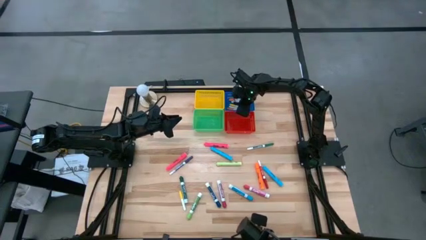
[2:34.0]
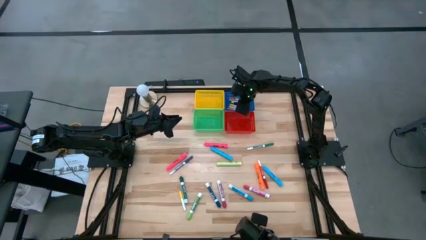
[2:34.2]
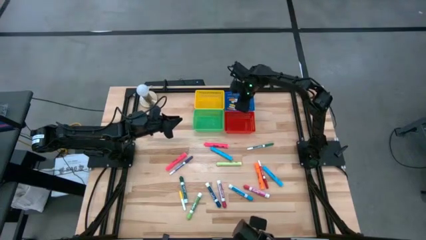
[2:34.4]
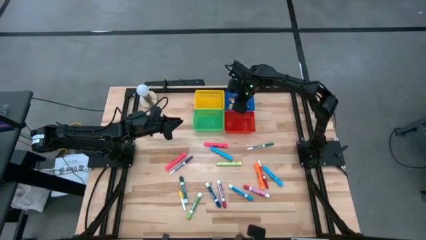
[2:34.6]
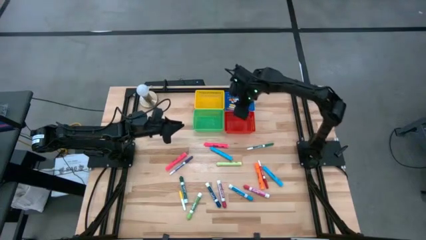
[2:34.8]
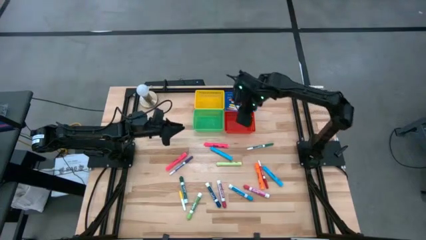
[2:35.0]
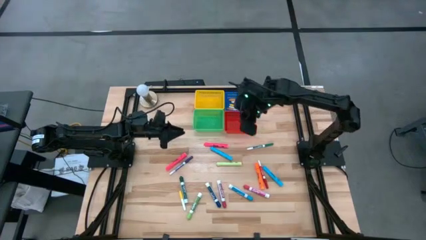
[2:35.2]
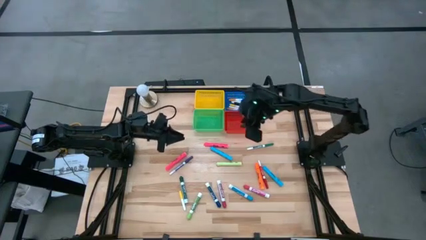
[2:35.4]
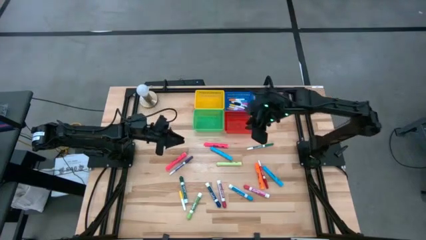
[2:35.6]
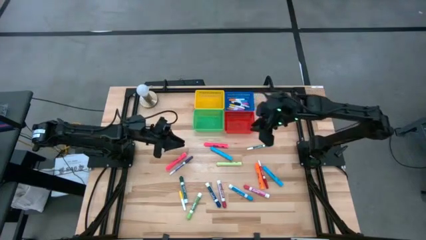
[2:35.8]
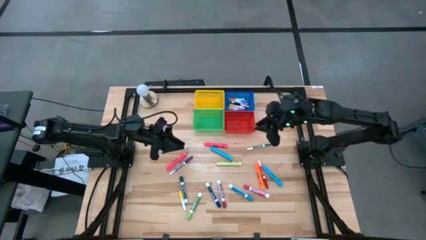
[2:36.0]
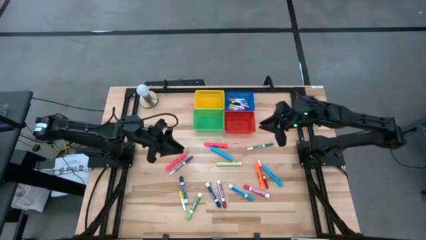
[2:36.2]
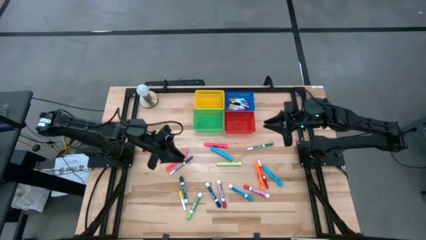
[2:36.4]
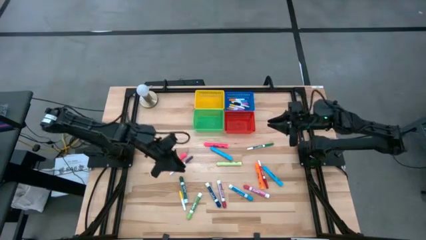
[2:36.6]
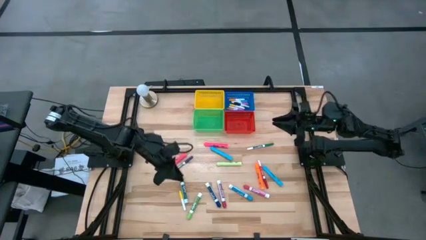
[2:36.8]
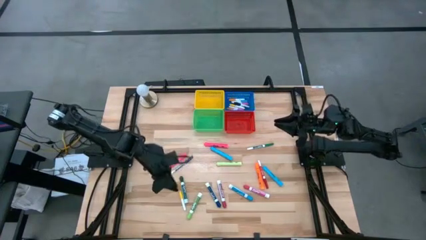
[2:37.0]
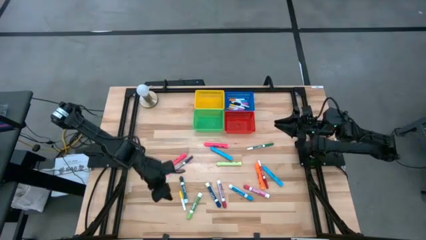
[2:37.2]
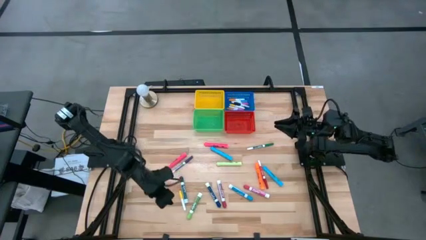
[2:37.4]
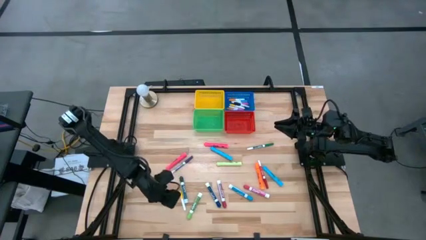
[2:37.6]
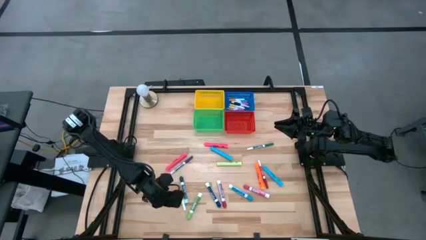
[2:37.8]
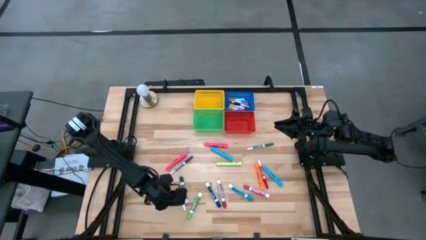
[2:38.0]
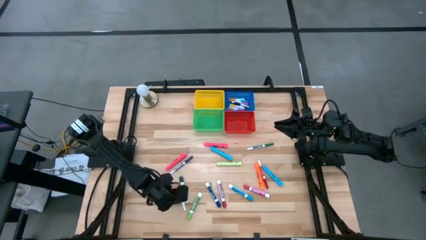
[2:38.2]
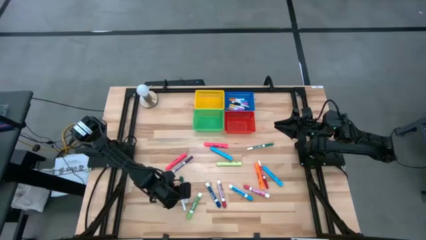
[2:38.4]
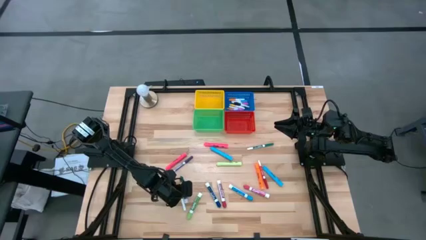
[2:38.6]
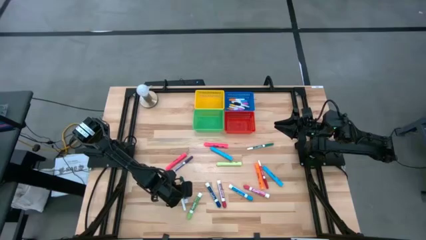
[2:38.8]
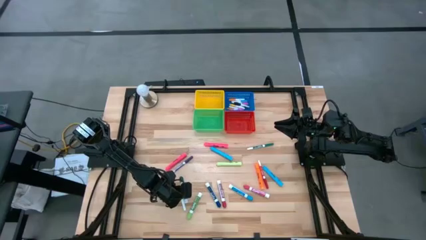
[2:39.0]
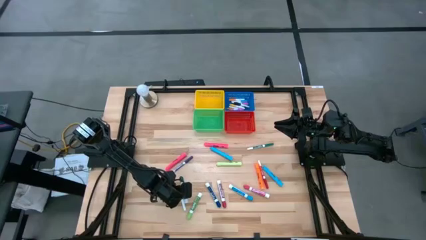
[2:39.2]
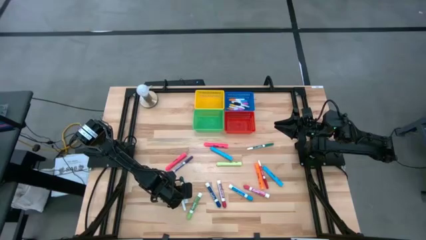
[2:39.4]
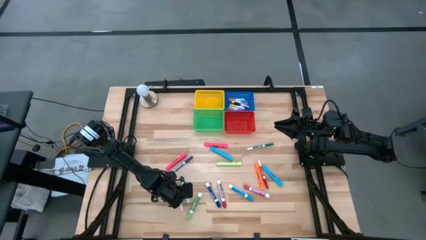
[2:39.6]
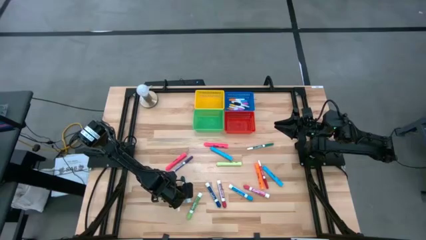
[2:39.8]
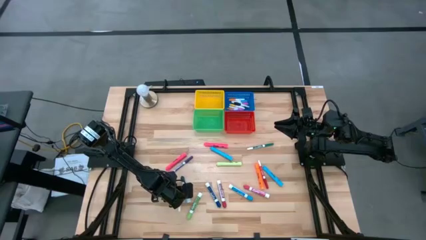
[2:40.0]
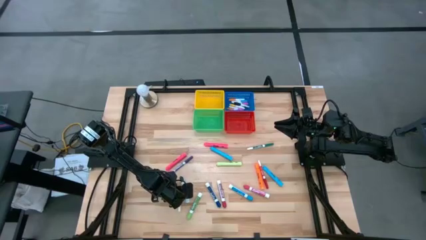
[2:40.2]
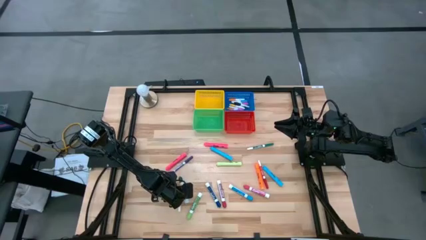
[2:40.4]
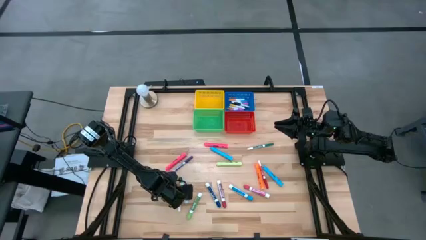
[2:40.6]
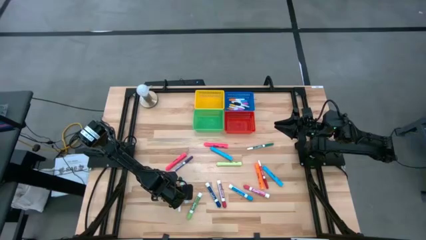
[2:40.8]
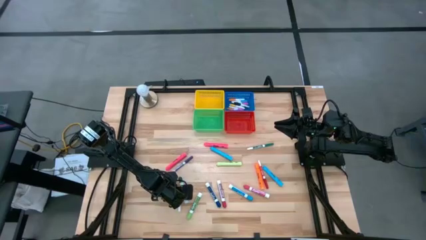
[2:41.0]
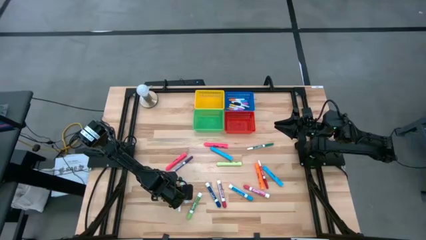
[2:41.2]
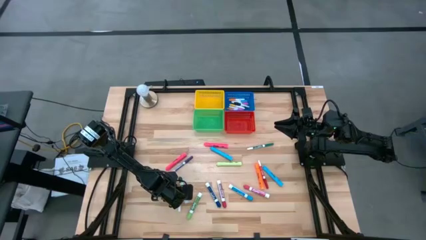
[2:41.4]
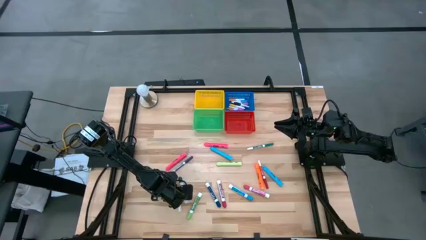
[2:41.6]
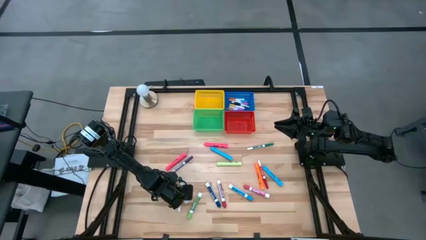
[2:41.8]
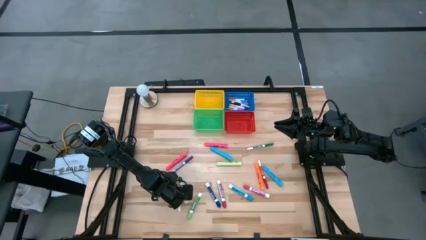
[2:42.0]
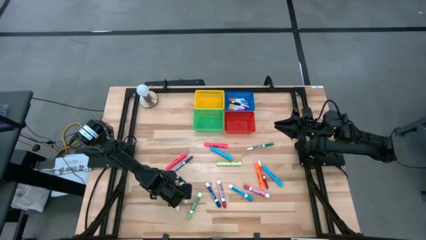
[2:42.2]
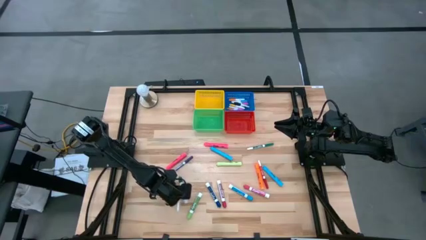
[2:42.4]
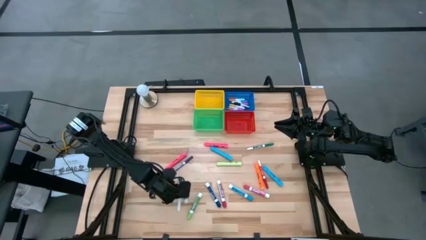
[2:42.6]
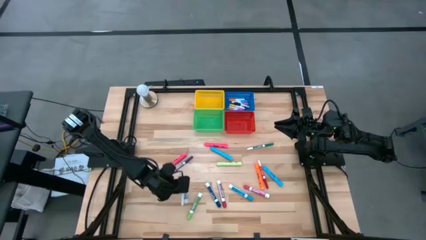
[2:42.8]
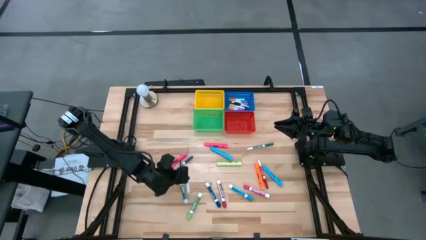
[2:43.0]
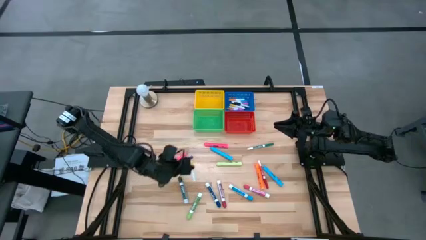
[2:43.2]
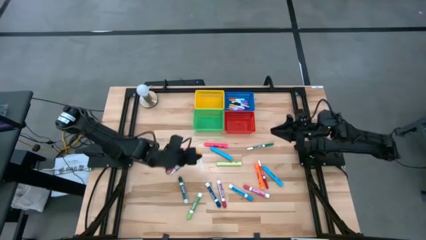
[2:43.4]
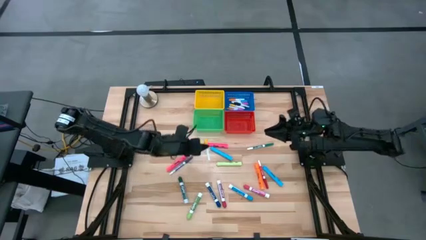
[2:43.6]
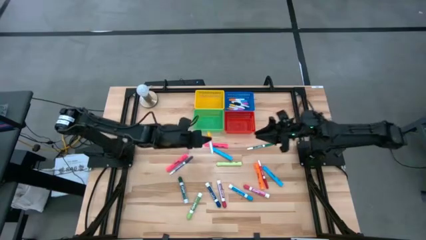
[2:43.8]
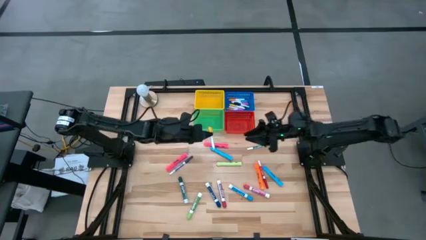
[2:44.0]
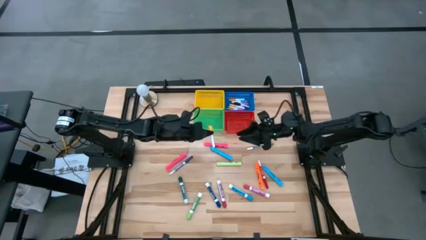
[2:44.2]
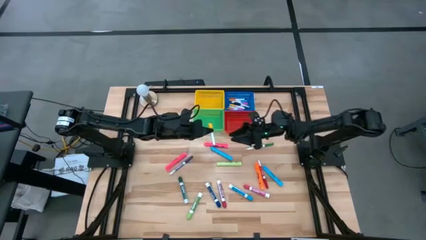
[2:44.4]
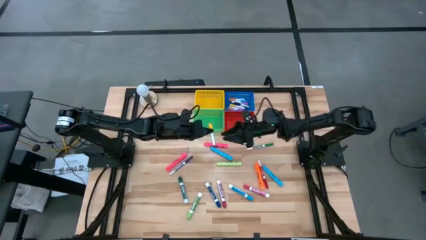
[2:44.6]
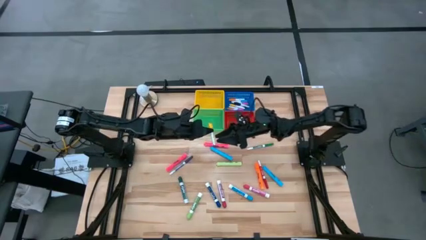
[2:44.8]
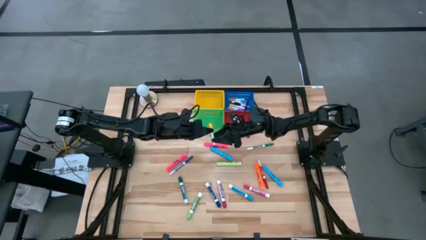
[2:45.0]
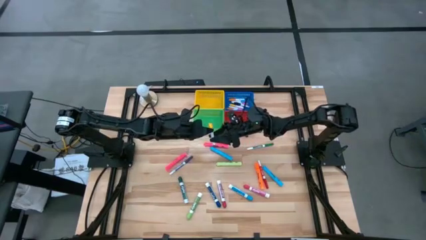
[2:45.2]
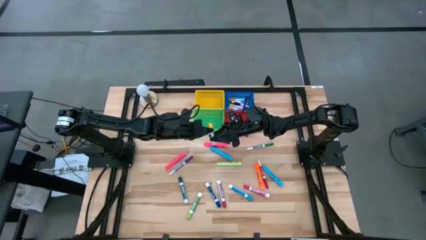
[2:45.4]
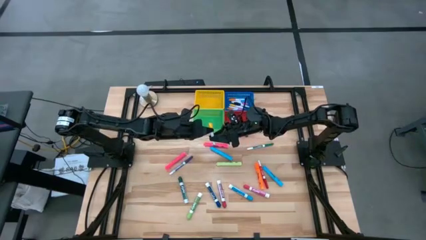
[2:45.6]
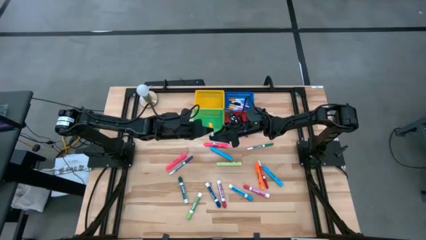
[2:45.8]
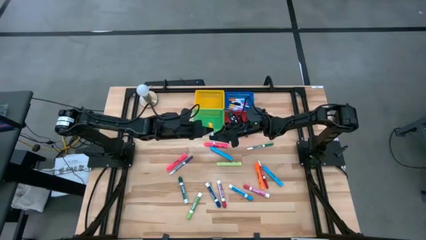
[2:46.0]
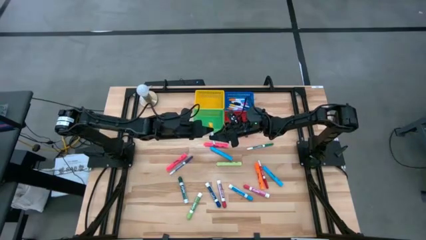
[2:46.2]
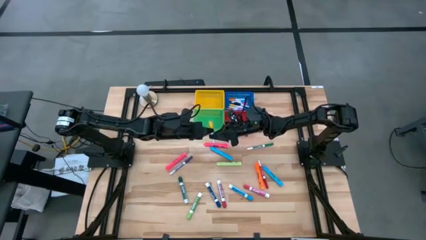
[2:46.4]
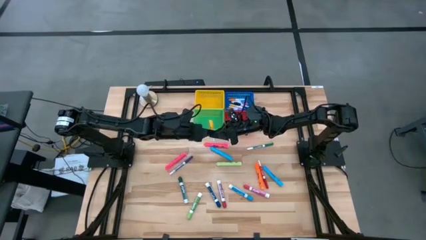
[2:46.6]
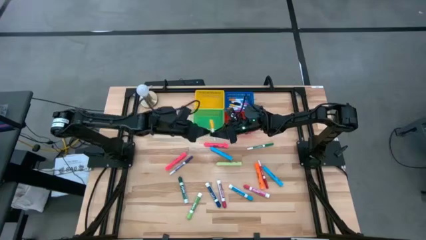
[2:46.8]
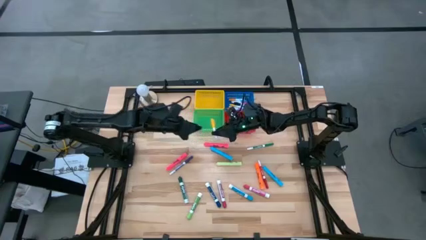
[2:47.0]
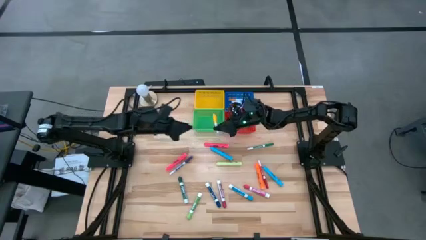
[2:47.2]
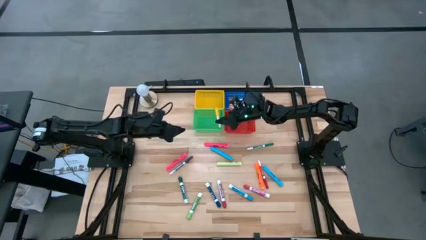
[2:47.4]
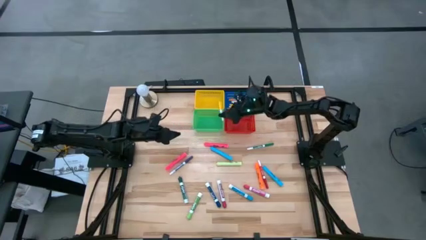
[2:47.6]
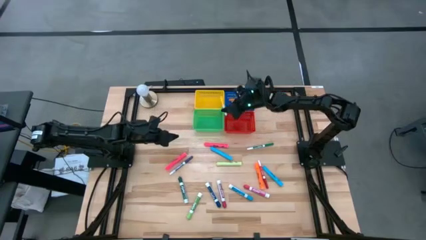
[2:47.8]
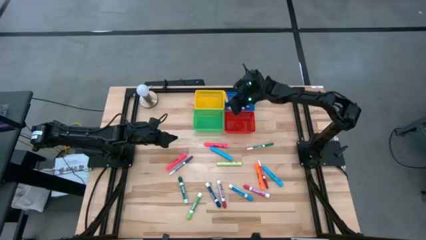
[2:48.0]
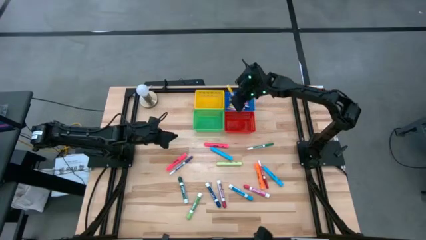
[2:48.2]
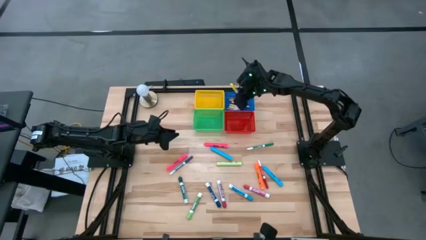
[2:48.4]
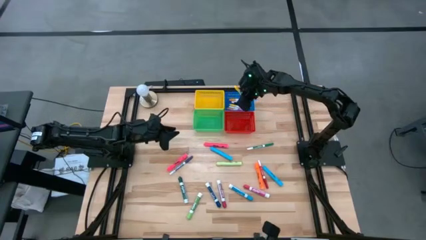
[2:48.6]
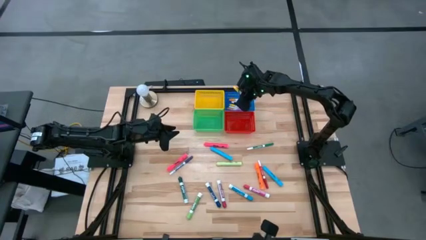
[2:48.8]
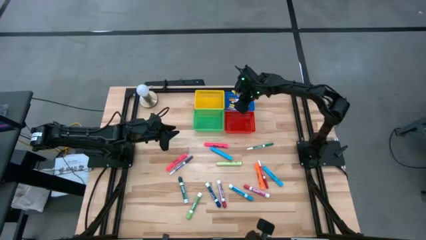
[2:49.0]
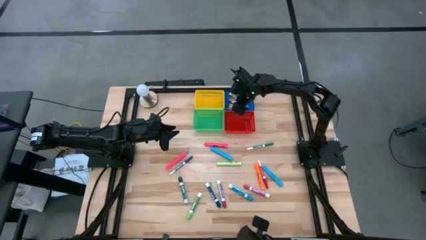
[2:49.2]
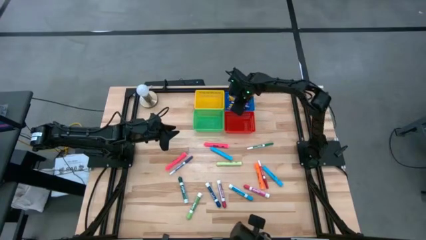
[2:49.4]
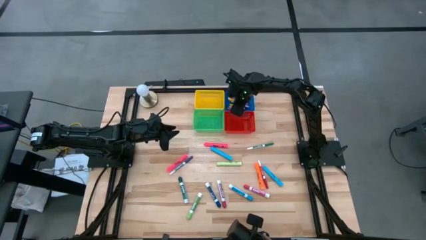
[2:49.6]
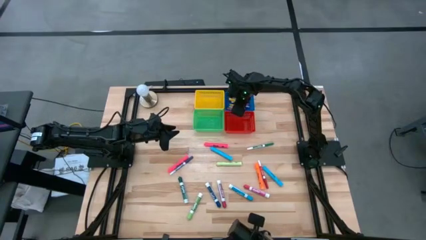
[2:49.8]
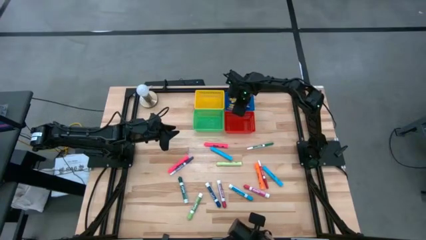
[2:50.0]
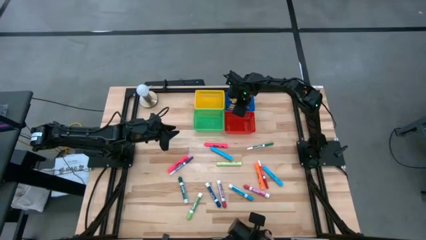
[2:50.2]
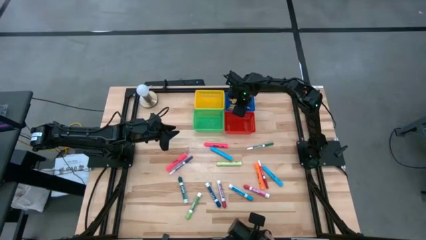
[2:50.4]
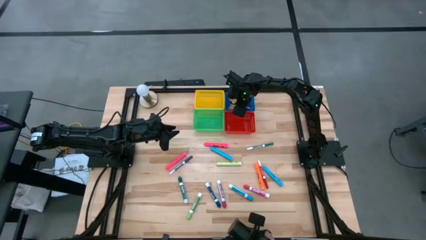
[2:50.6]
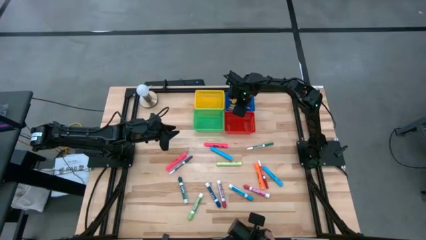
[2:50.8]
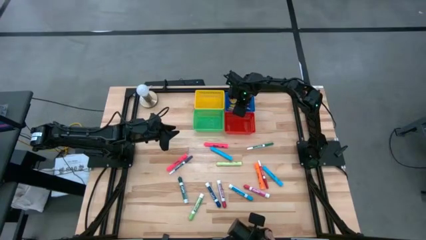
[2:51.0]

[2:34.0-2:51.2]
Task: Pick & Place Markers
Put the small yellow highlighter pen into the blue bin
